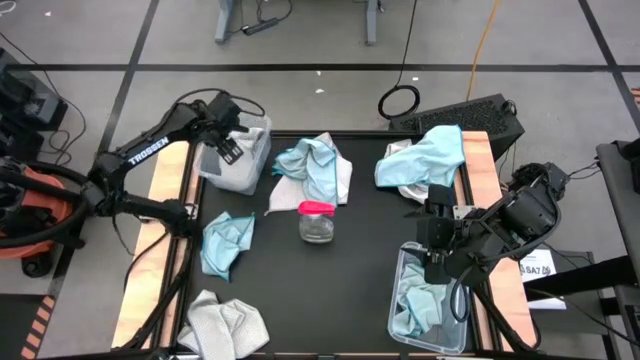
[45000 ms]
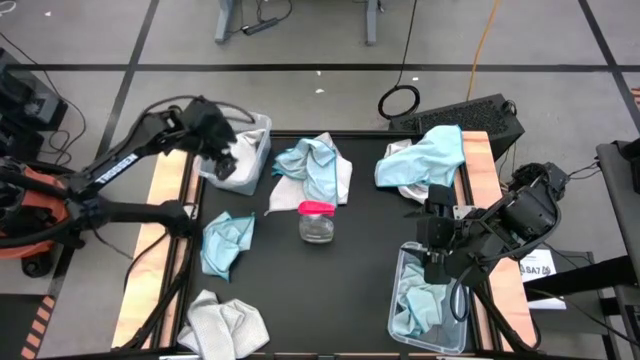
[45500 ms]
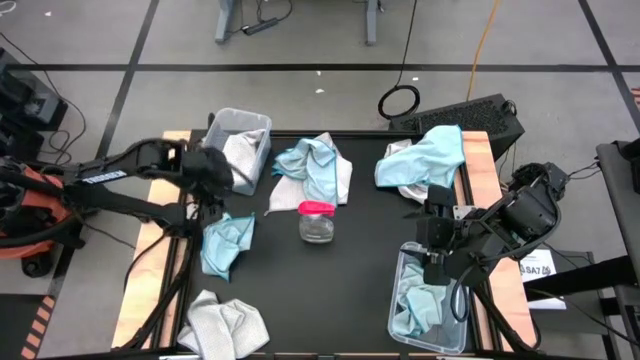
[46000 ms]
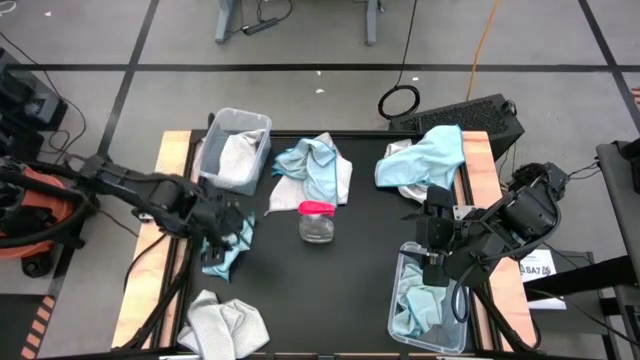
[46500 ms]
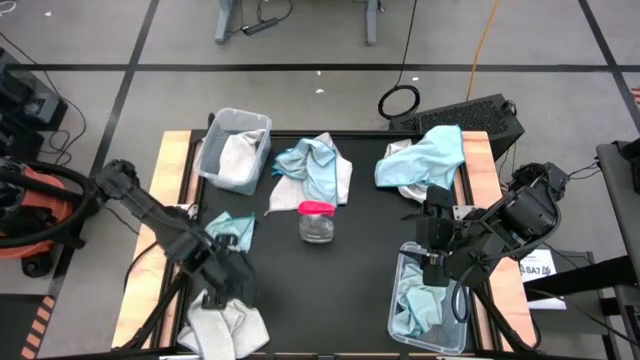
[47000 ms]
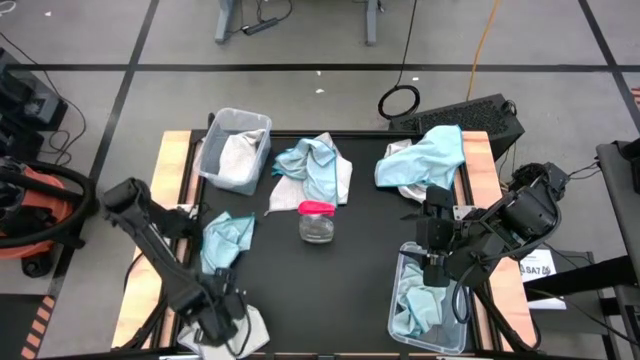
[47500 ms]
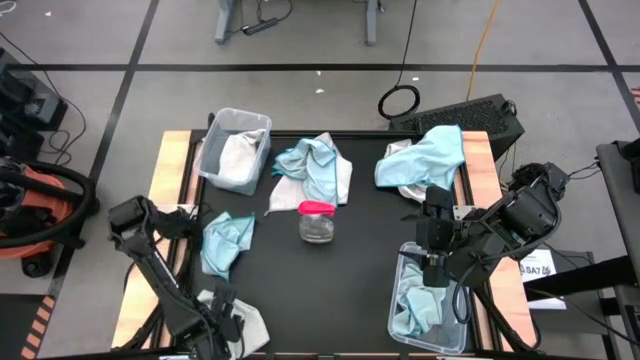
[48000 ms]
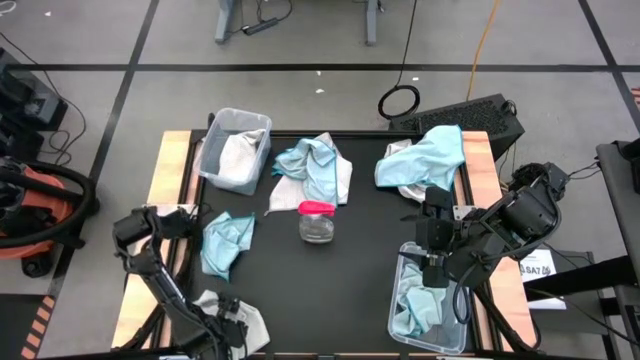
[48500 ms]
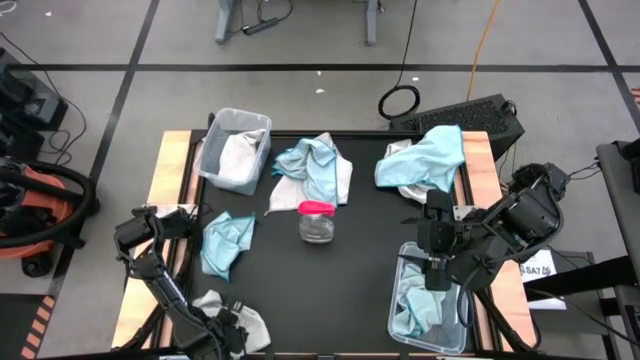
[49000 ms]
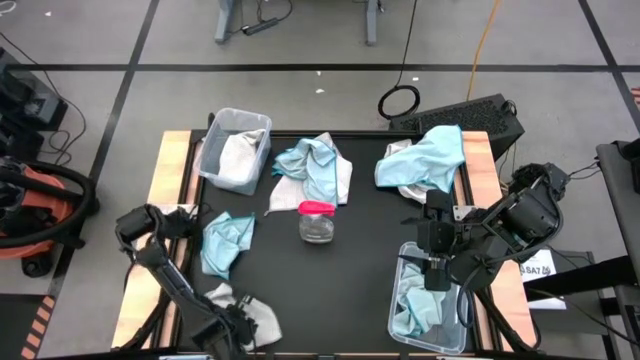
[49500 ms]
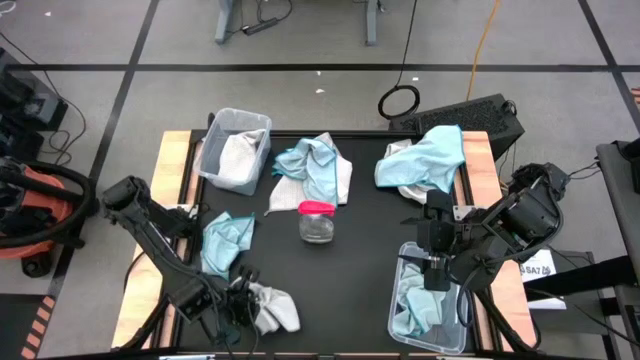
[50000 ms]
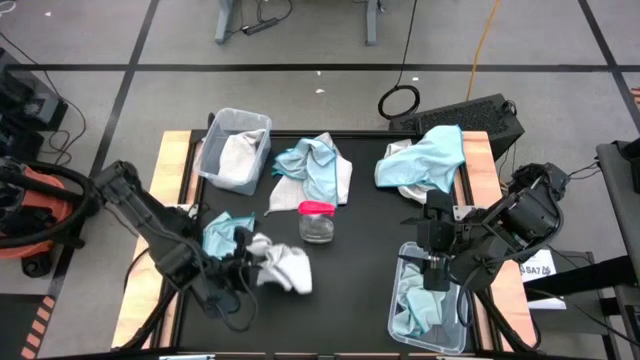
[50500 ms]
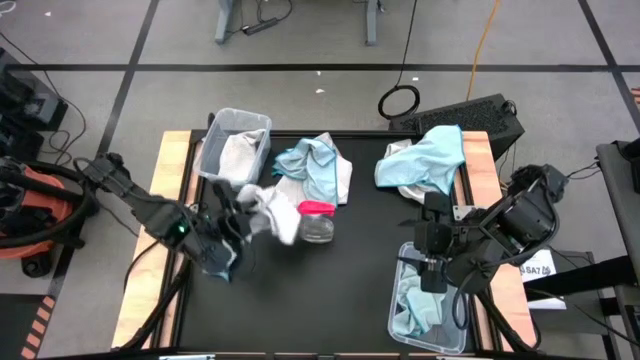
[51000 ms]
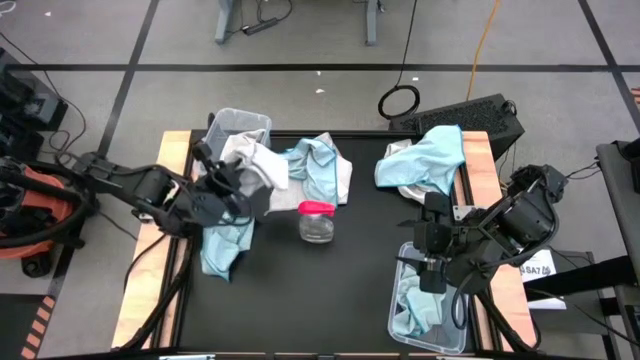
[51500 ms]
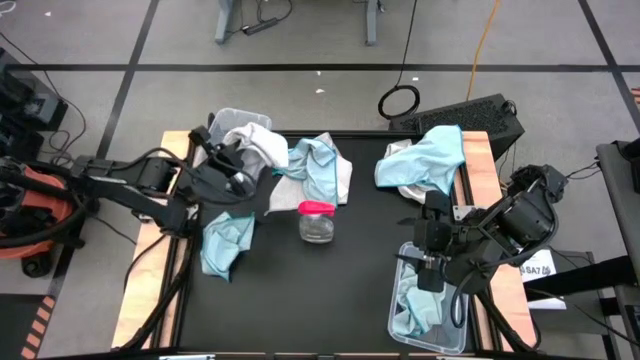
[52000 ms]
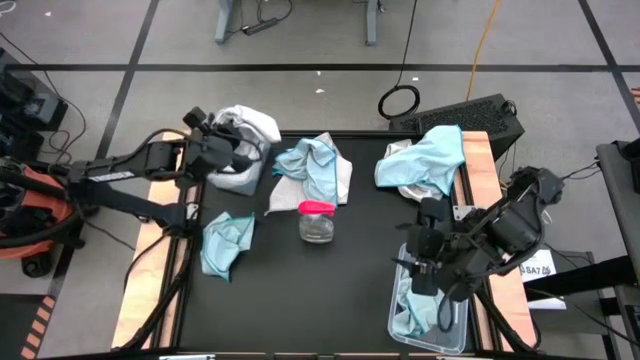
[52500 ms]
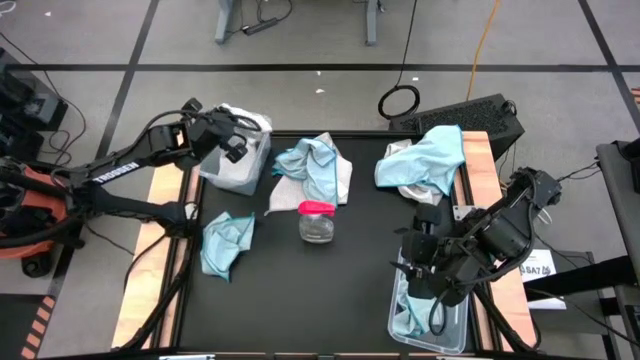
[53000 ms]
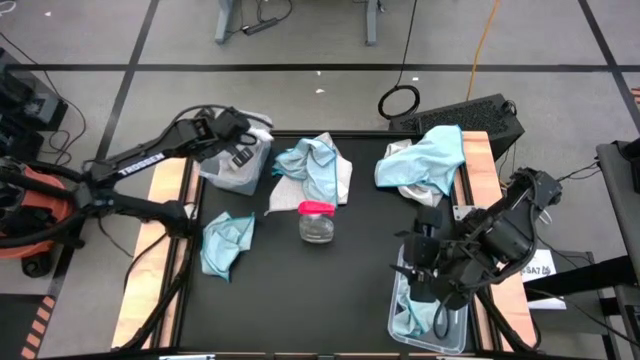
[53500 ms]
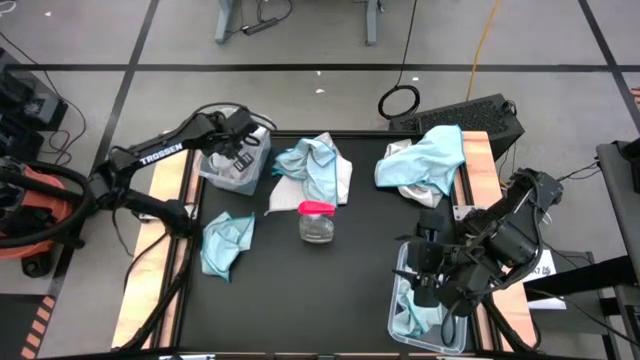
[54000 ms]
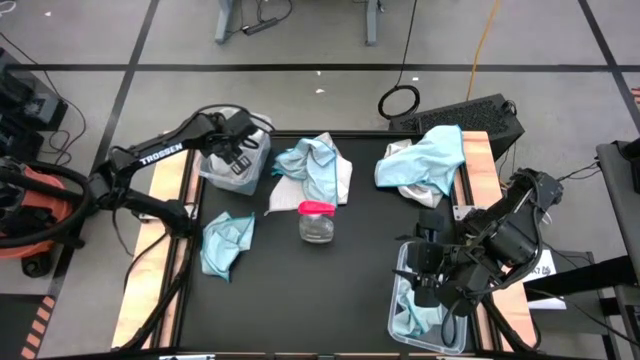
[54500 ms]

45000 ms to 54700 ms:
Task: Sort microfiber towel by color & place in baskets
Put the bottom left gray towel into the left transparent bin

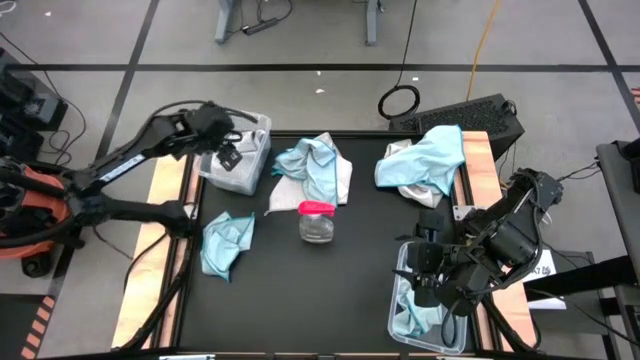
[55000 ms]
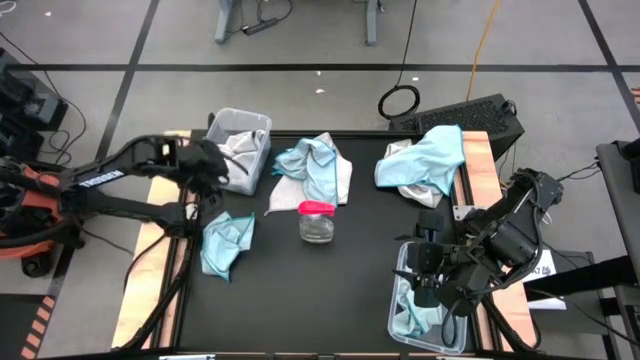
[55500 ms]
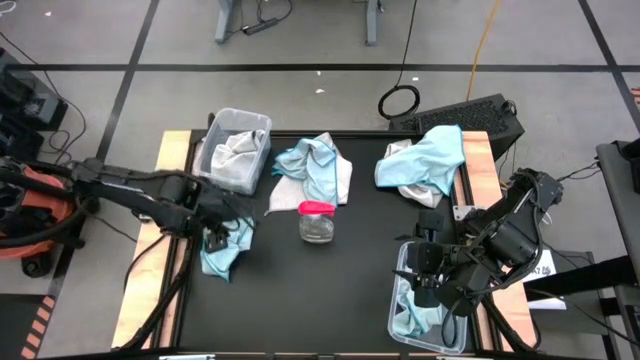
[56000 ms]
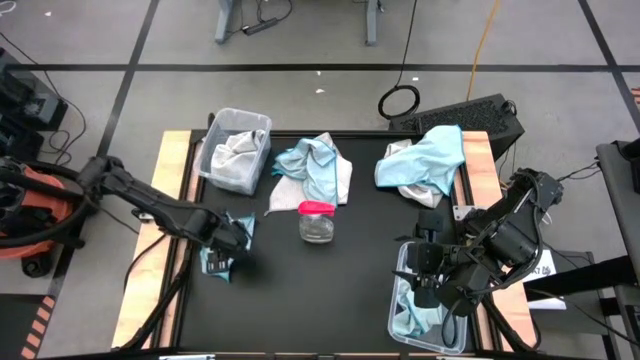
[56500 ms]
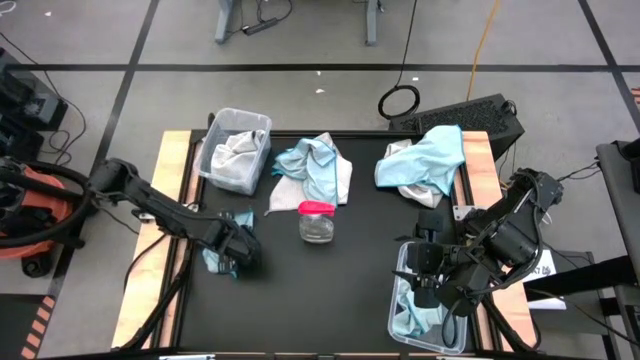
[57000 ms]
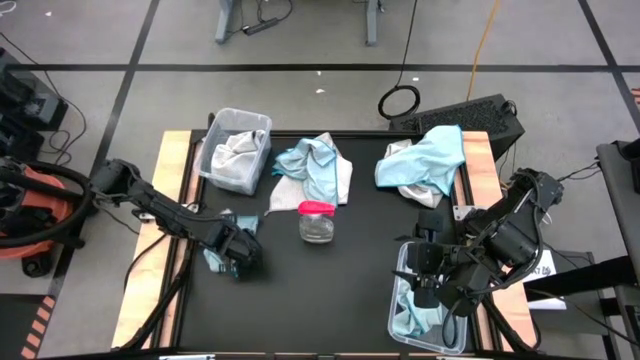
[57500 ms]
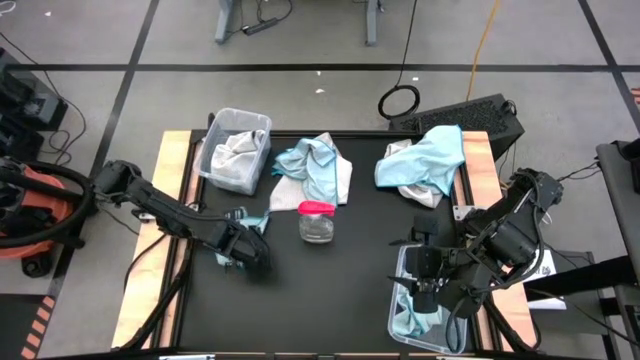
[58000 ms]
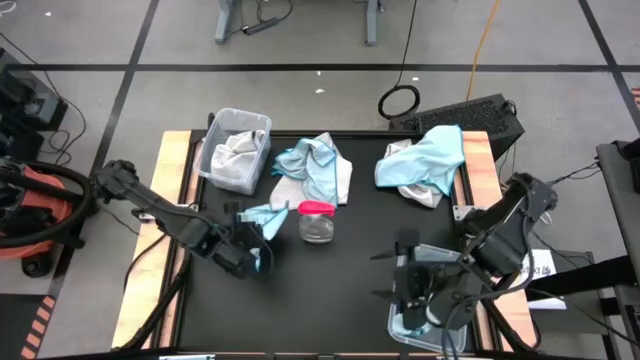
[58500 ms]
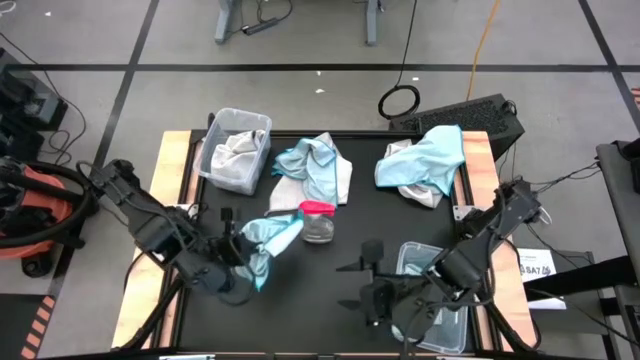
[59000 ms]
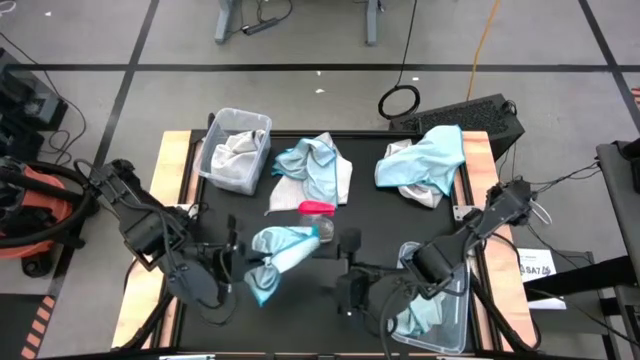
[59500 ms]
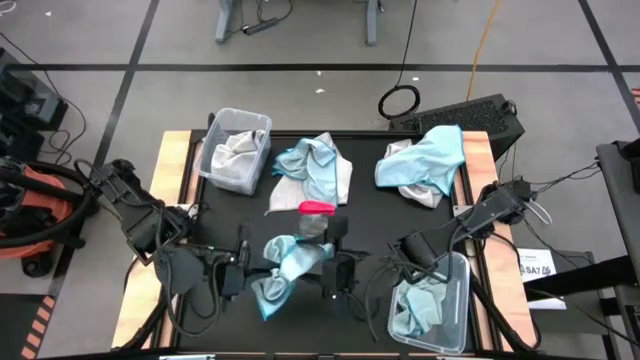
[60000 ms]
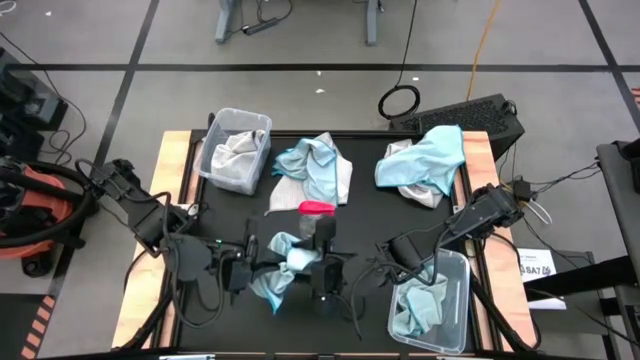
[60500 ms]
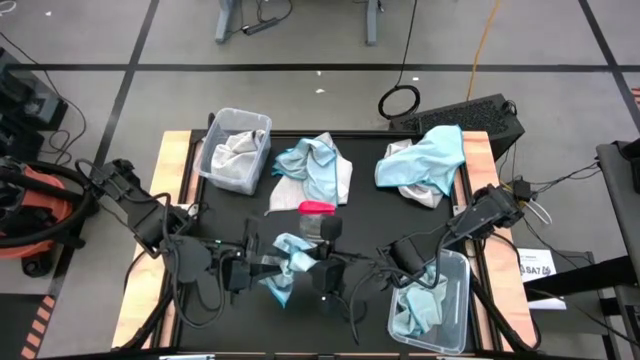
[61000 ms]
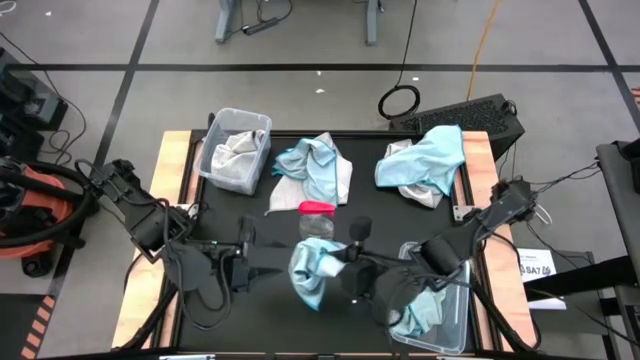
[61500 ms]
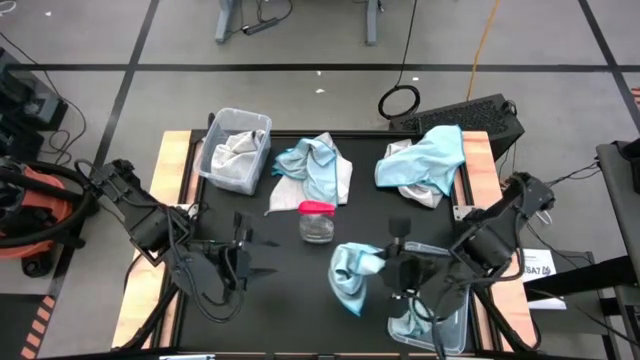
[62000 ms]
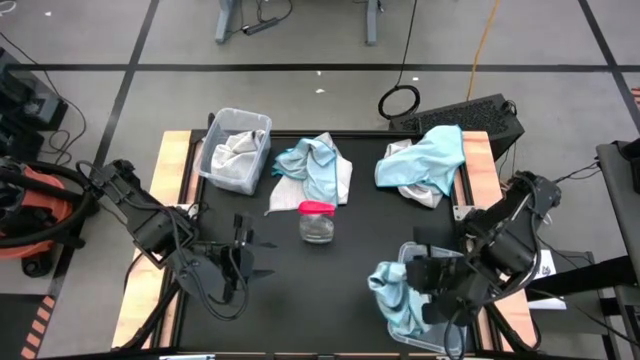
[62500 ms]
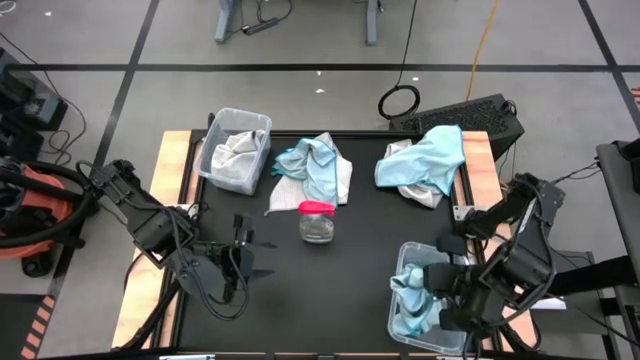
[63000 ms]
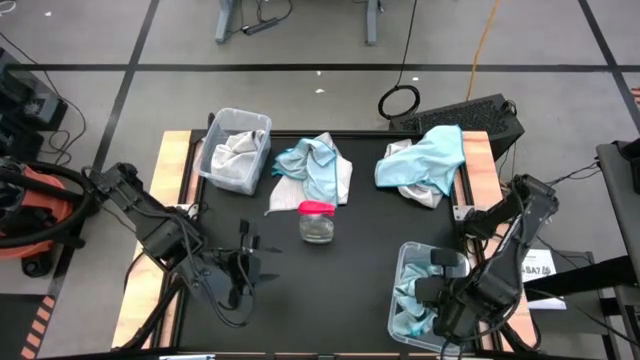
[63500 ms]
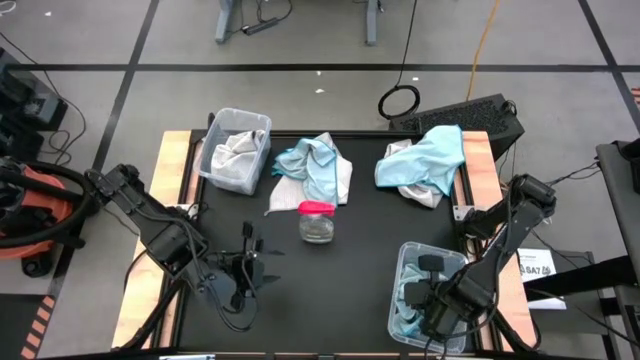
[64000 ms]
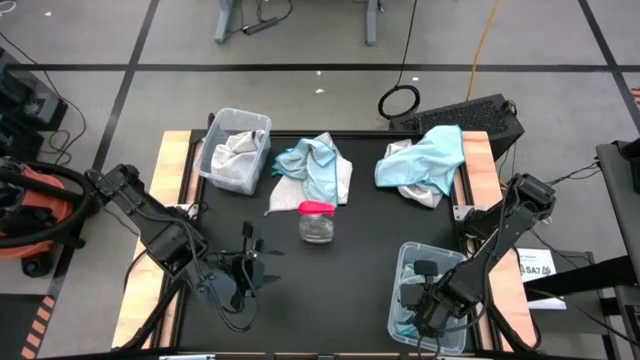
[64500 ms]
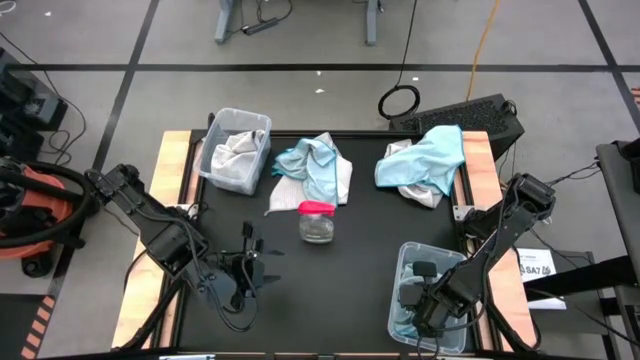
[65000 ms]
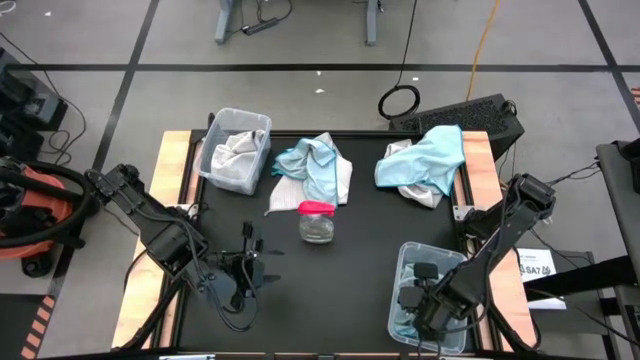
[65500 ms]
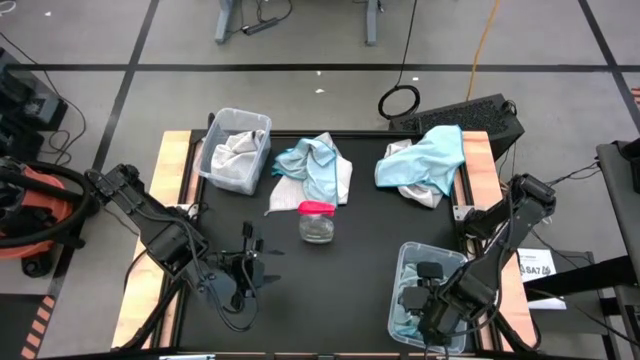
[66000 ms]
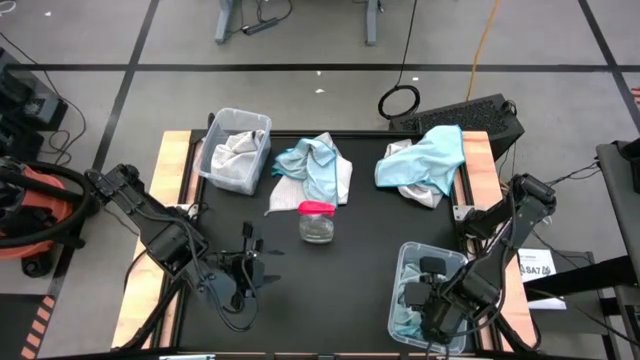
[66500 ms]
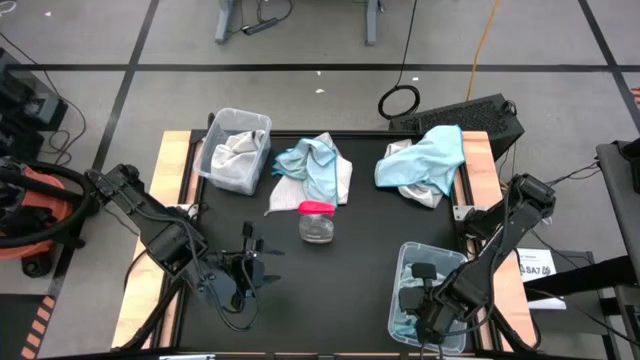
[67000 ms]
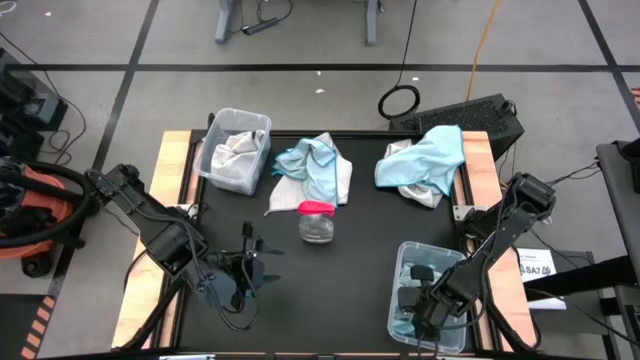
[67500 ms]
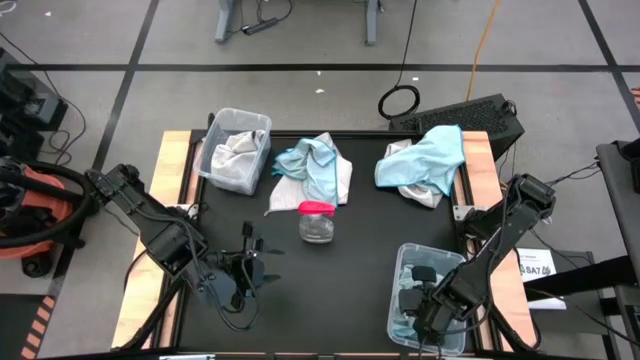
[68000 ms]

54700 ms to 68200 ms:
Put the bottom left light blue towel into the right transparent bin
